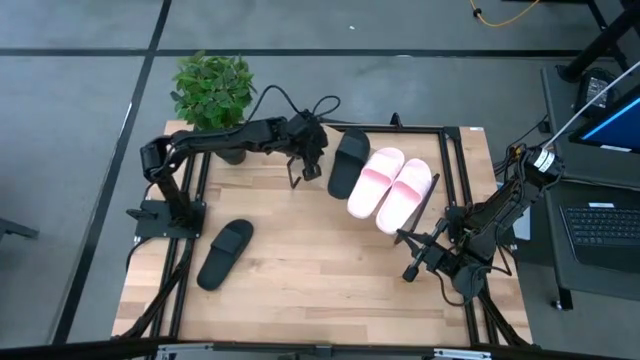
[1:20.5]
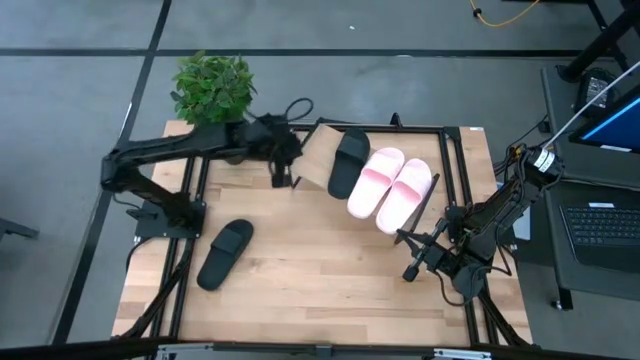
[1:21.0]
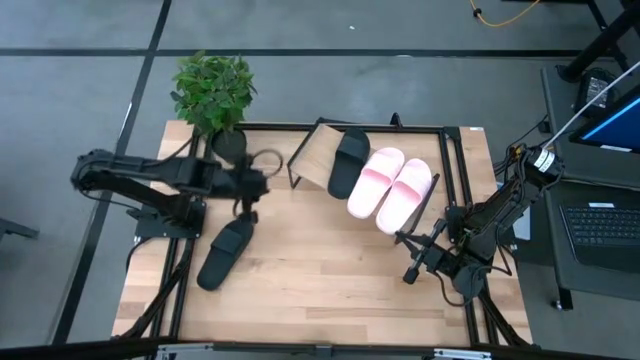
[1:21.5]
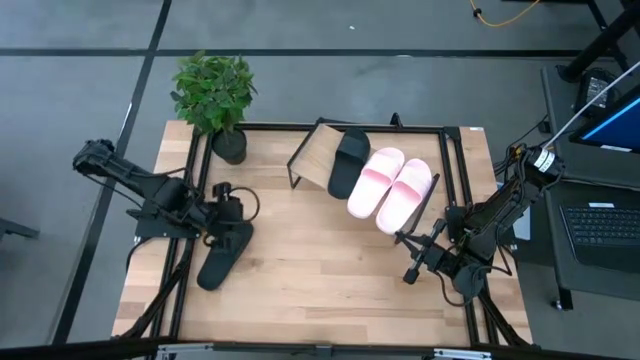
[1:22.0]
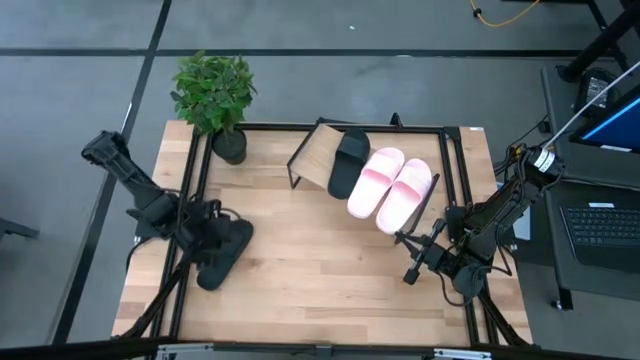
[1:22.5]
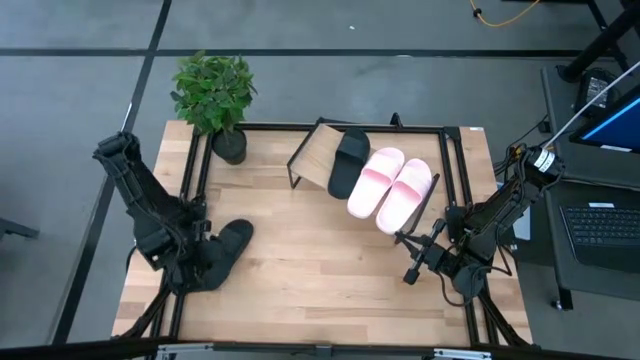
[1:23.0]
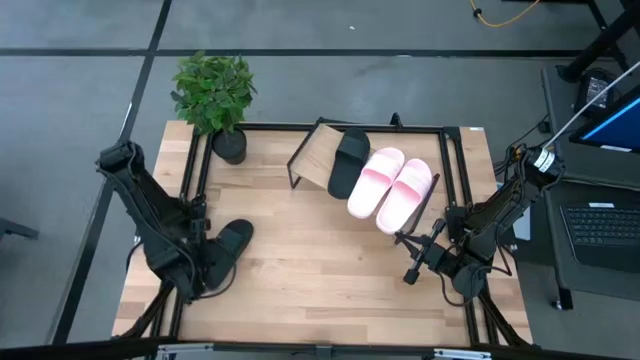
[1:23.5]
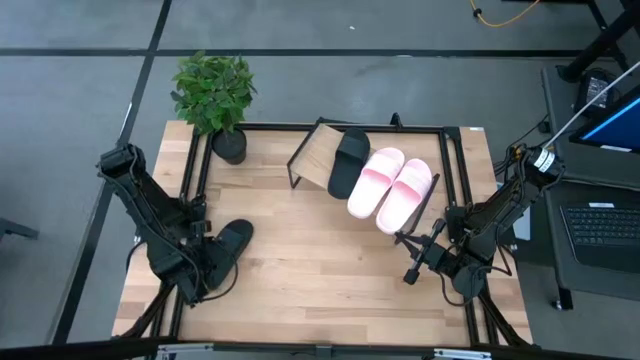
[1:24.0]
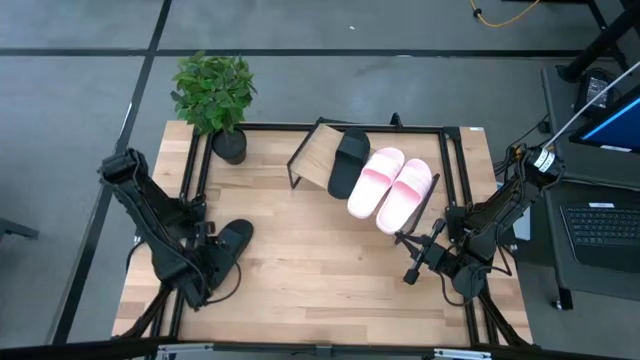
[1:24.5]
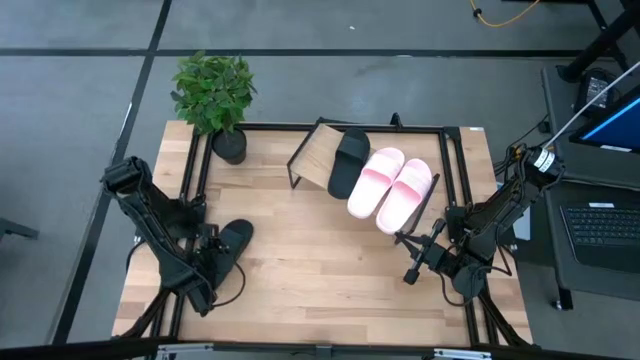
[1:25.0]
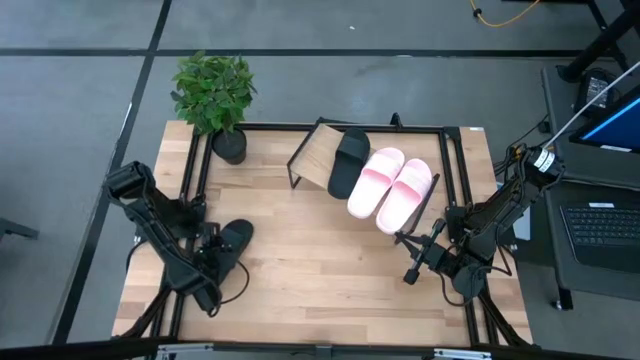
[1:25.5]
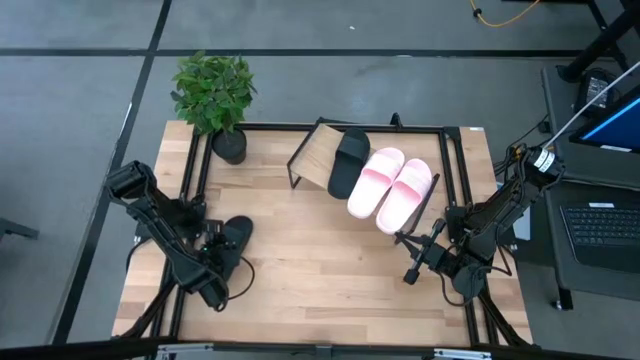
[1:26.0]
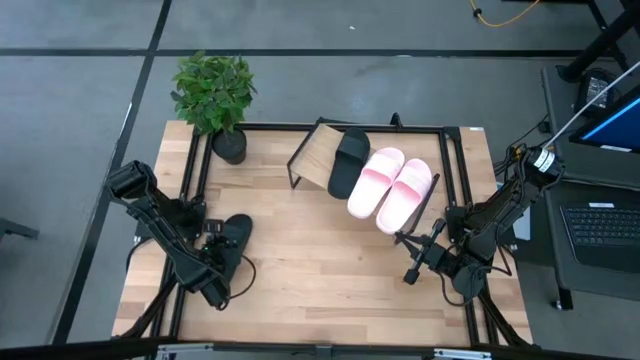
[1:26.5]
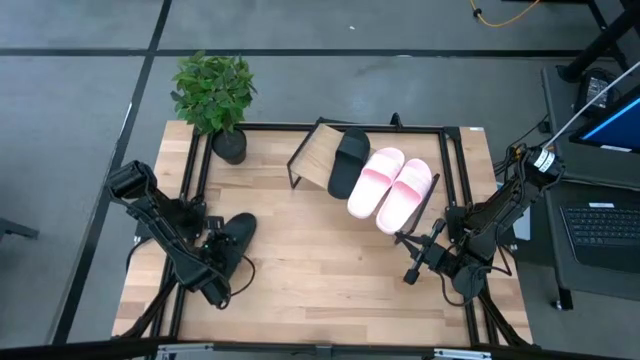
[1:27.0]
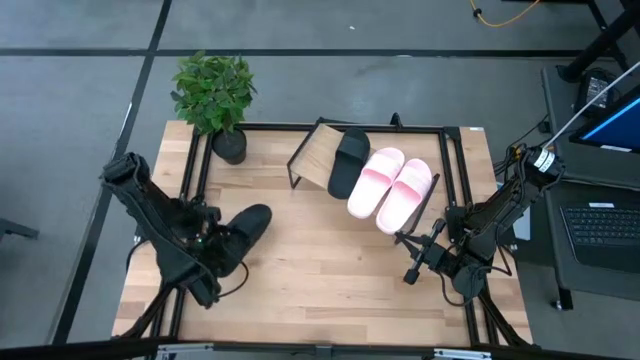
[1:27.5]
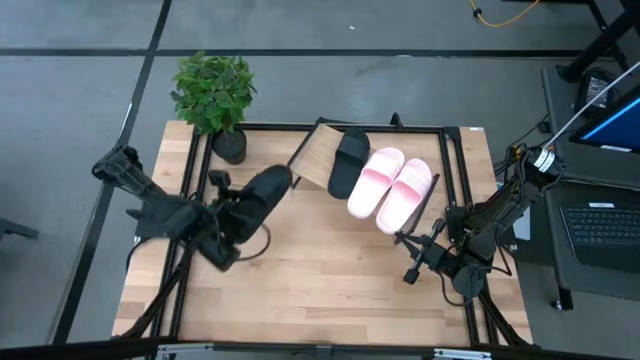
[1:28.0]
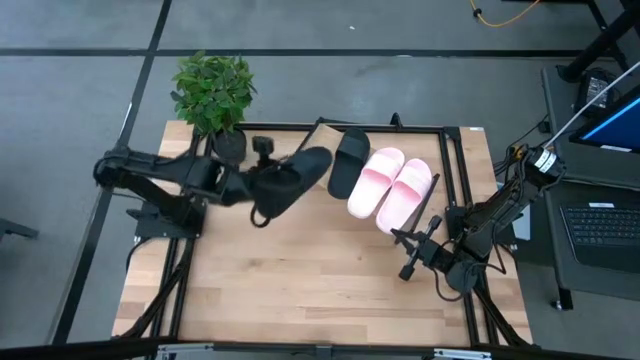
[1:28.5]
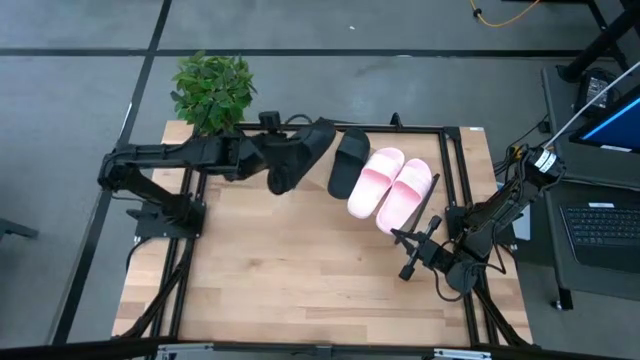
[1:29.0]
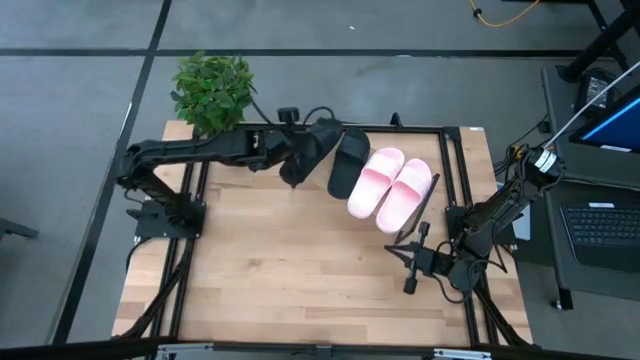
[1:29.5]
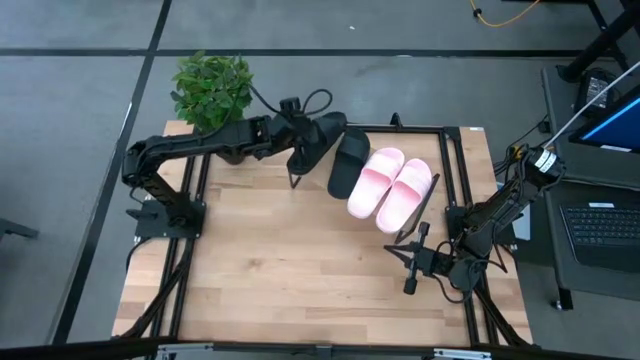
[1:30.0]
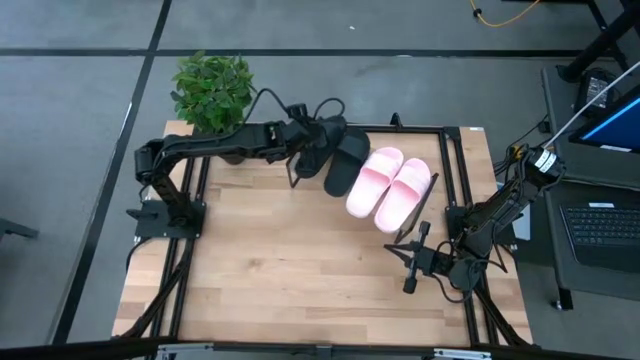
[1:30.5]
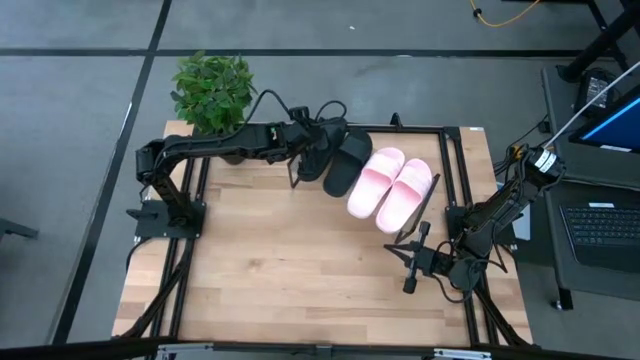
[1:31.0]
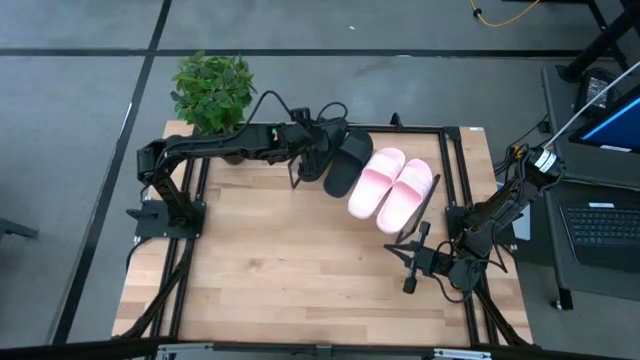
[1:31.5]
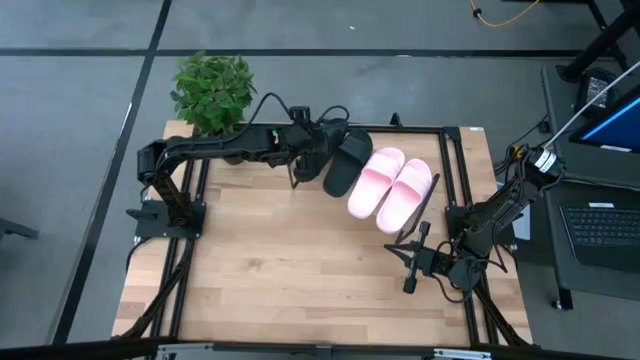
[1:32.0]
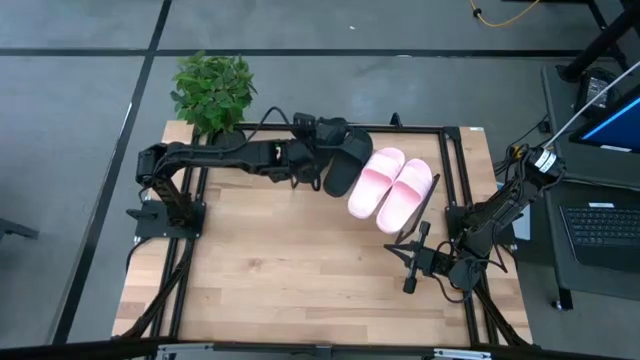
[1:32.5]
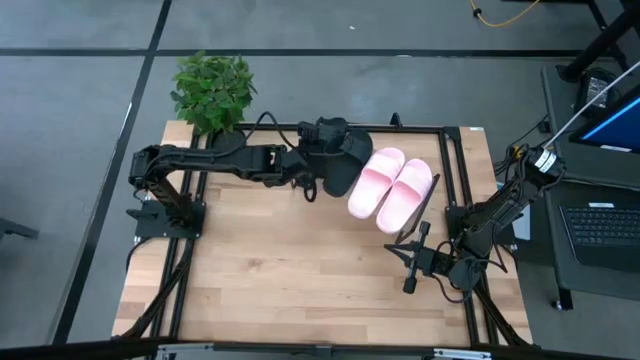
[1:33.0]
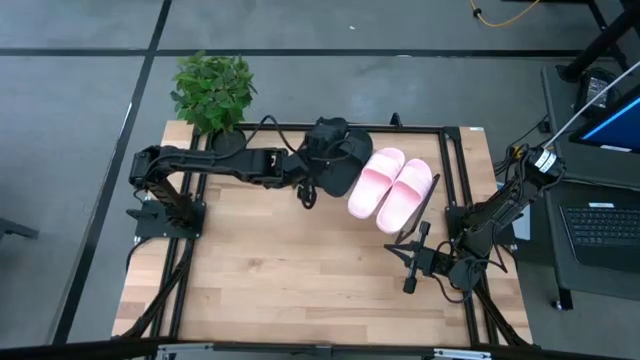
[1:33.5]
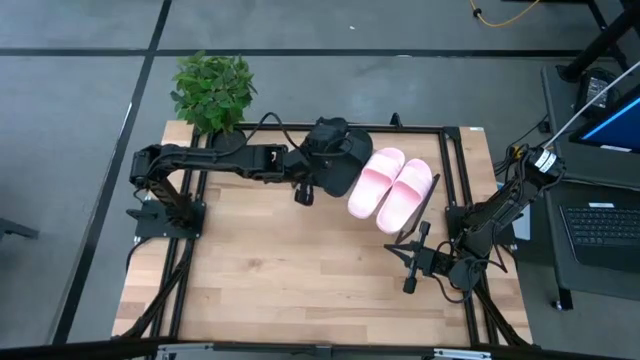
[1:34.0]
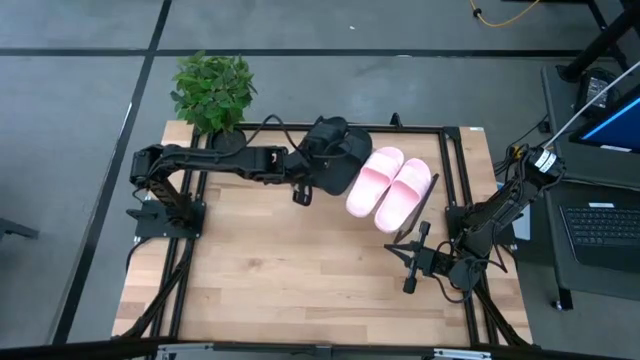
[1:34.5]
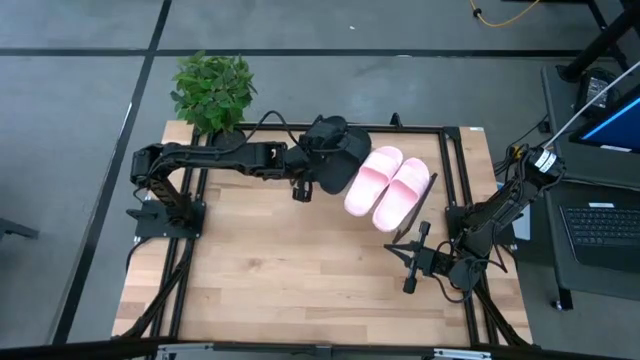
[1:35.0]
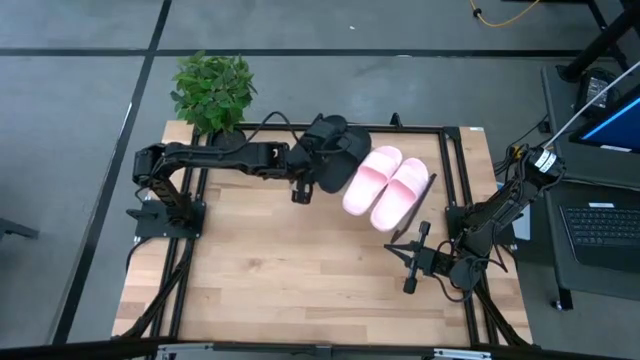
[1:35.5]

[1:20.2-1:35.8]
Task: Pick and place slides into the shelf
Put the black slide on the shelf

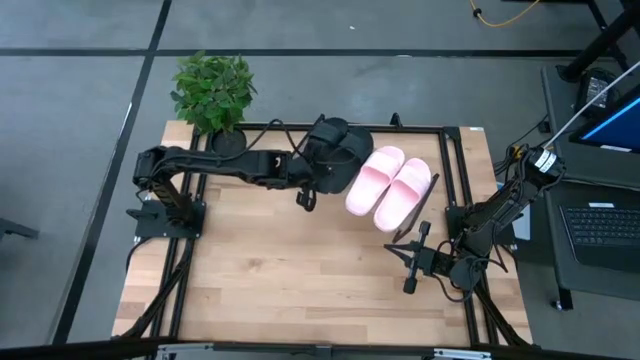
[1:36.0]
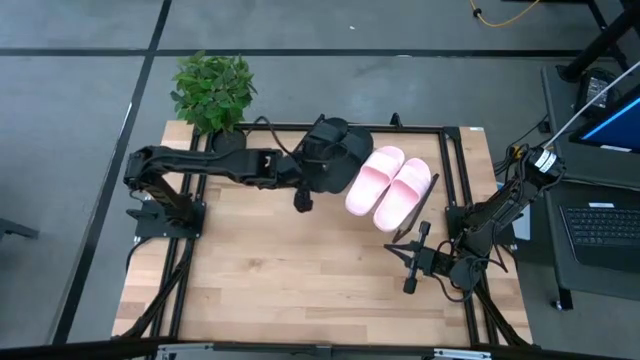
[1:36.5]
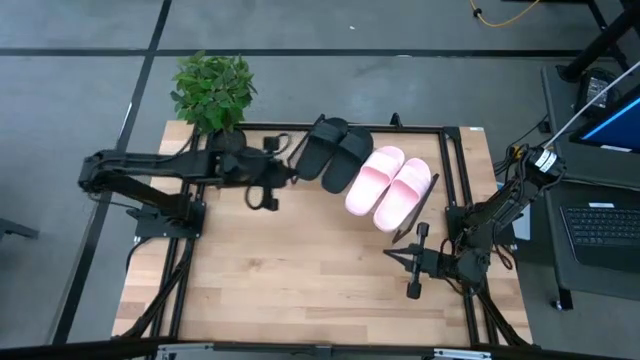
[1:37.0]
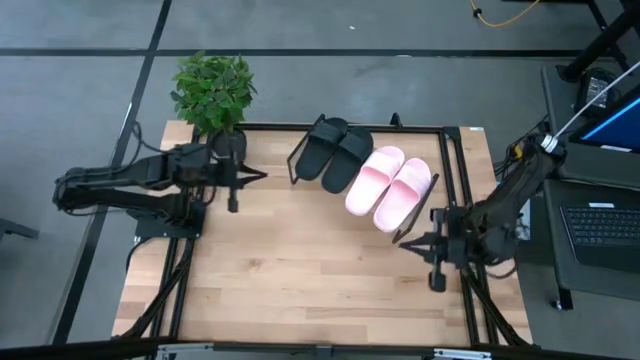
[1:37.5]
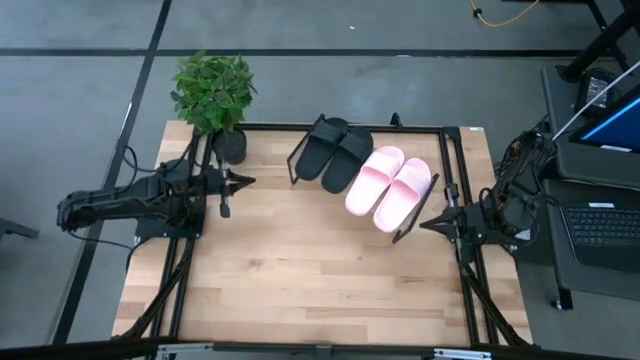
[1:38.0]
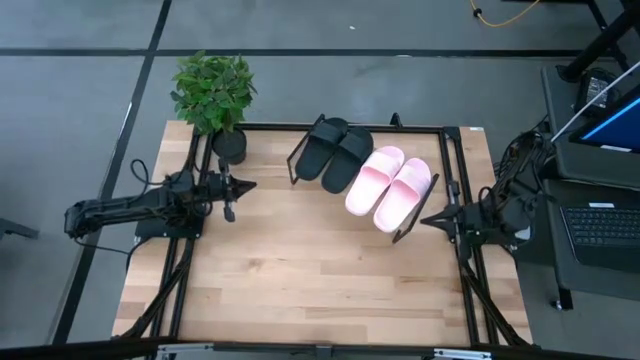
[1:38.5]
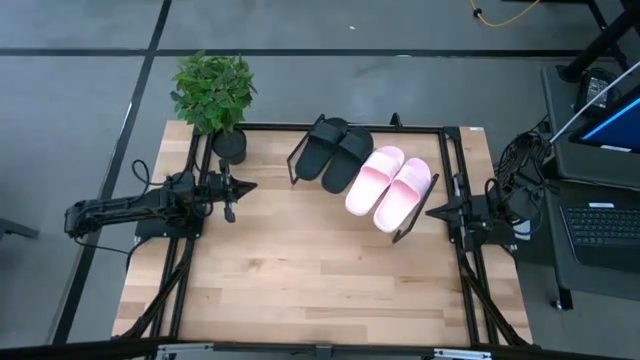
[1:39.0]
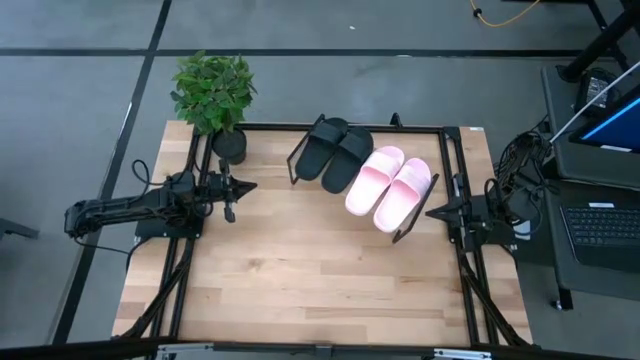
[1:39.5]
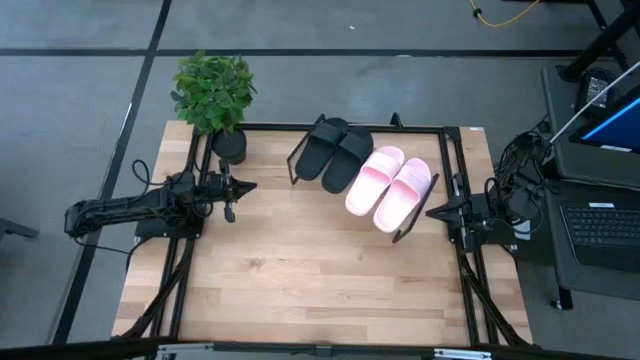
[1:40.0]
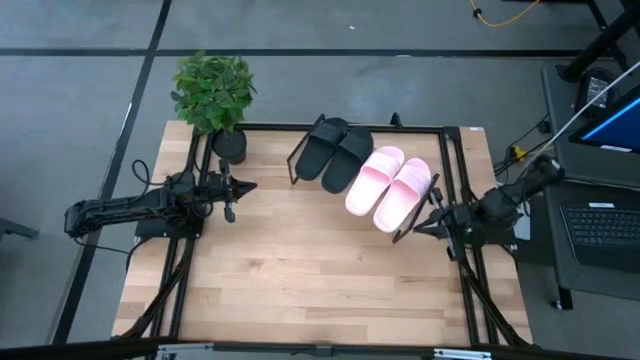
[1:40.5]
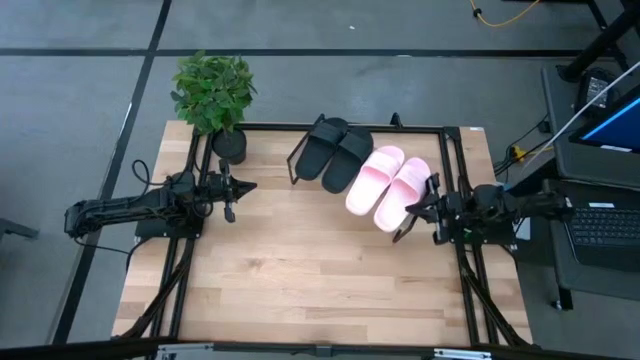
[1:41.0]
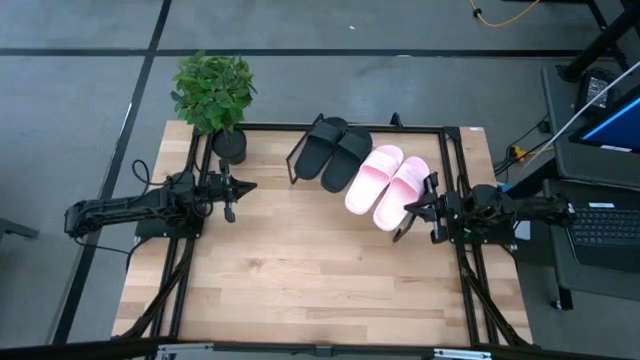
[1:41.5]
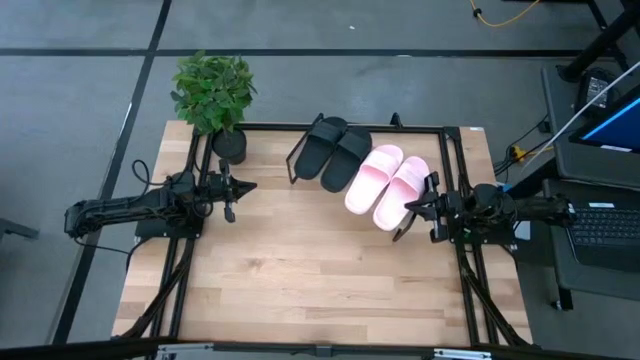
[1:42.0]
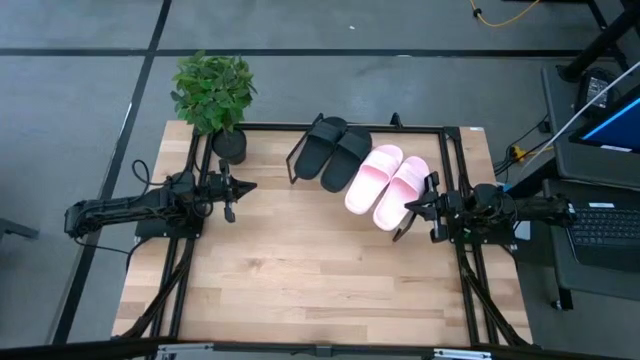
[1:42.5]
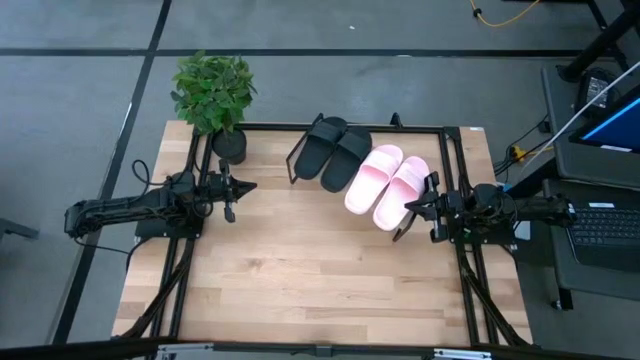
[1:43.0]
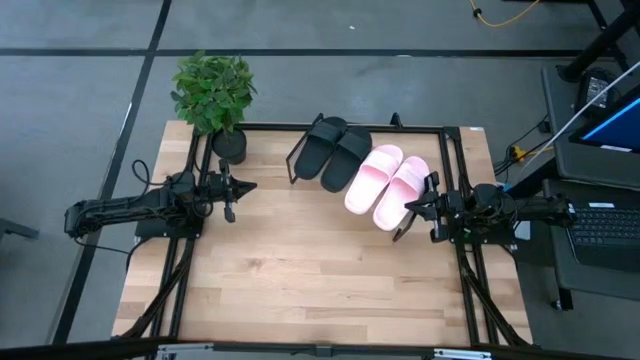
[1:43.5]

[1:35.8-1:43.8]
Return to Home Position
